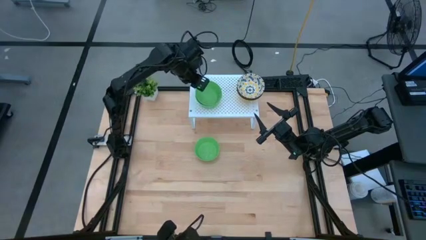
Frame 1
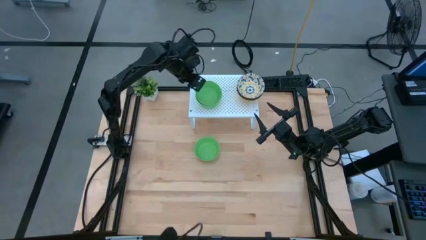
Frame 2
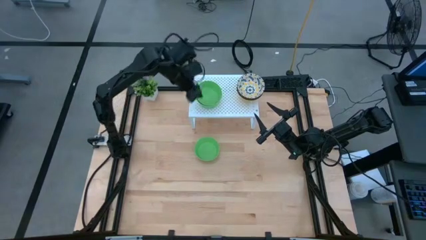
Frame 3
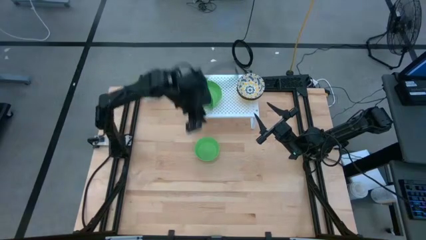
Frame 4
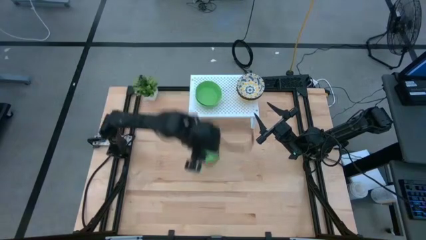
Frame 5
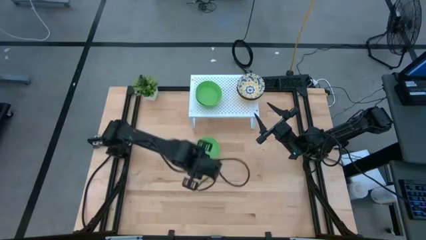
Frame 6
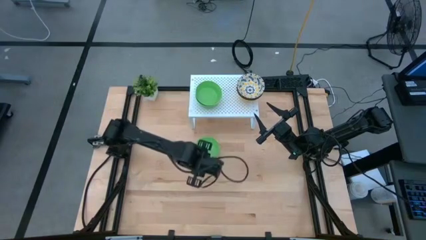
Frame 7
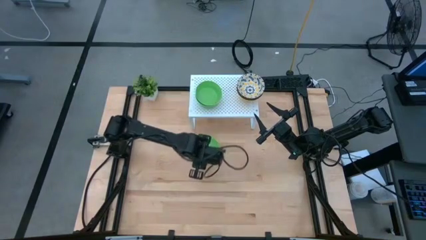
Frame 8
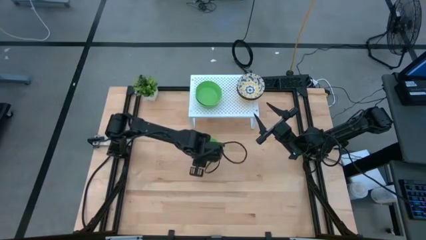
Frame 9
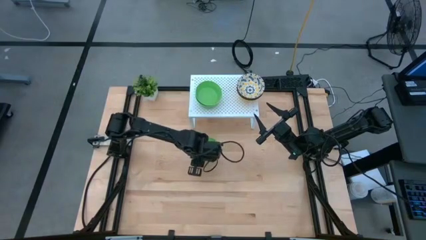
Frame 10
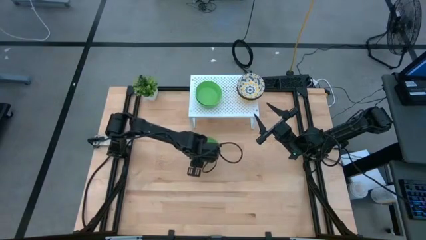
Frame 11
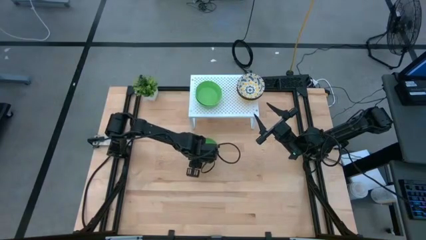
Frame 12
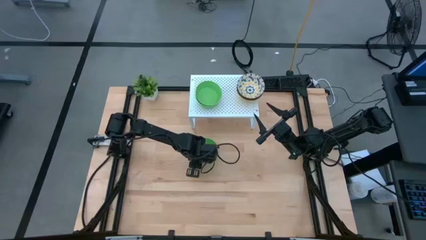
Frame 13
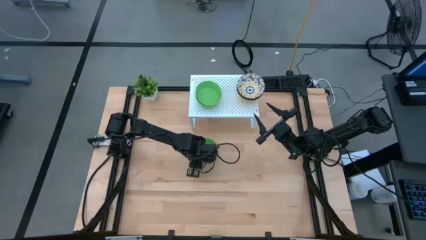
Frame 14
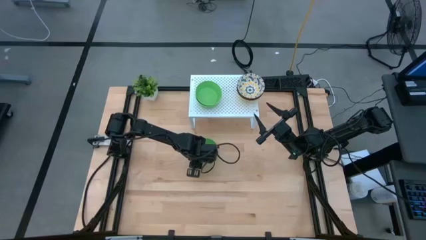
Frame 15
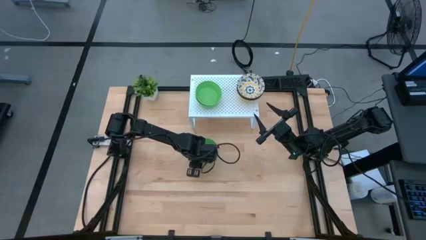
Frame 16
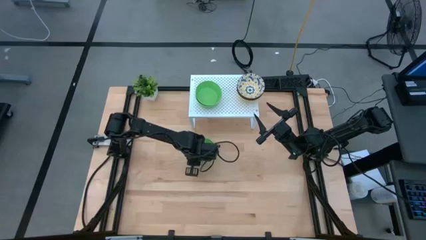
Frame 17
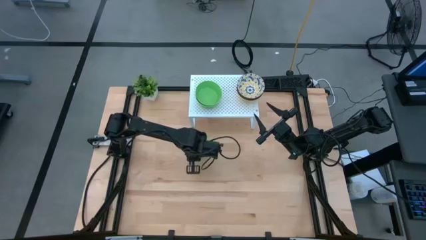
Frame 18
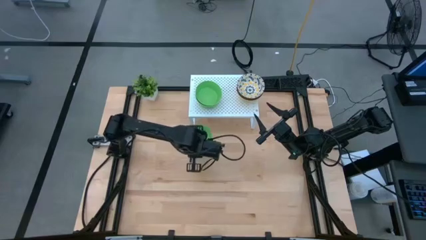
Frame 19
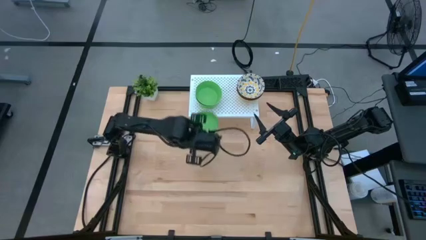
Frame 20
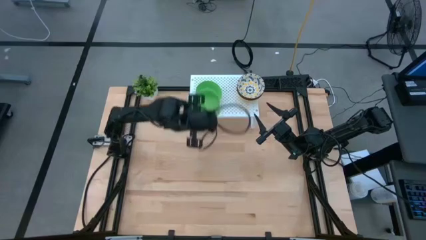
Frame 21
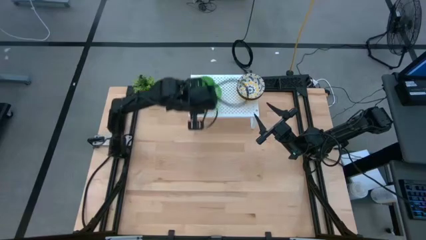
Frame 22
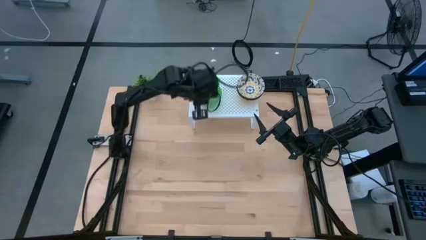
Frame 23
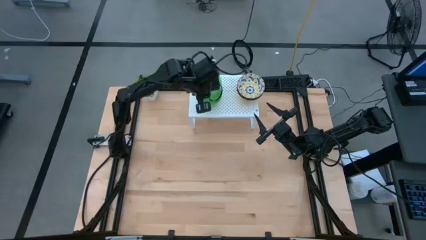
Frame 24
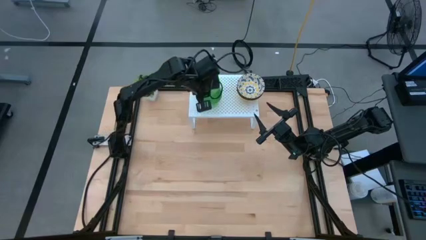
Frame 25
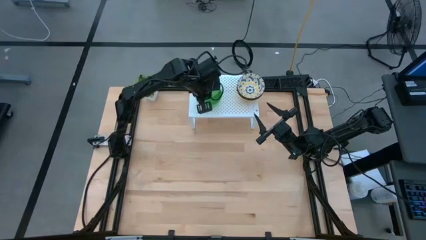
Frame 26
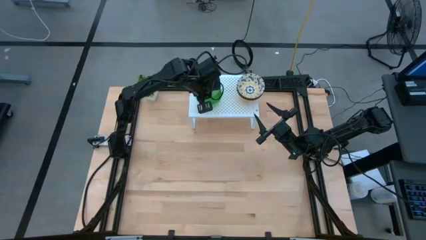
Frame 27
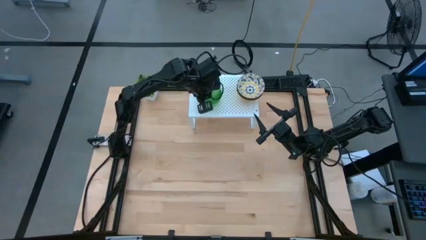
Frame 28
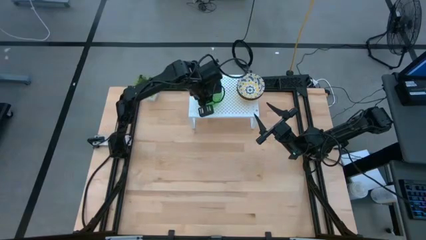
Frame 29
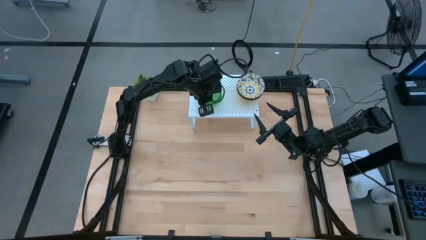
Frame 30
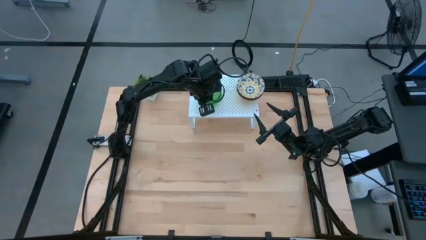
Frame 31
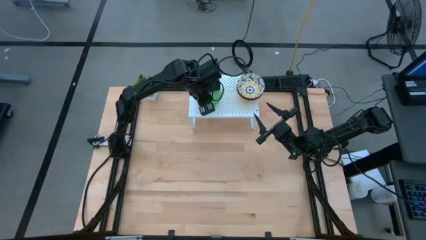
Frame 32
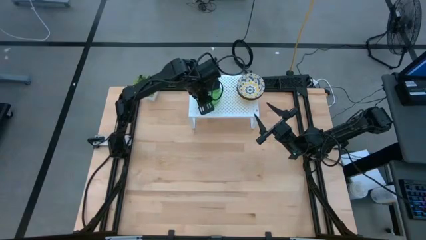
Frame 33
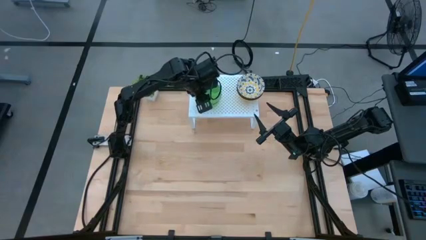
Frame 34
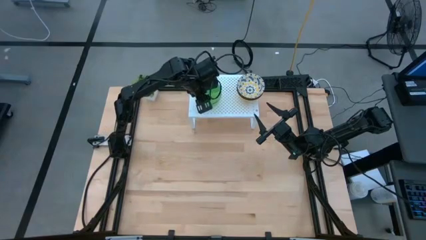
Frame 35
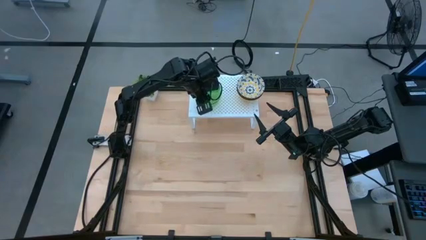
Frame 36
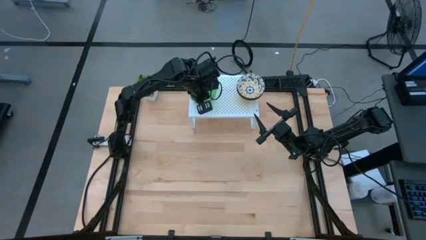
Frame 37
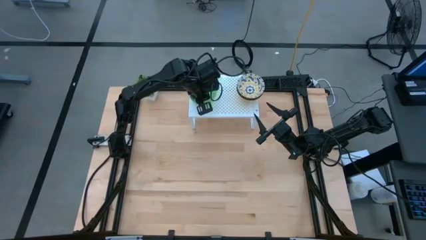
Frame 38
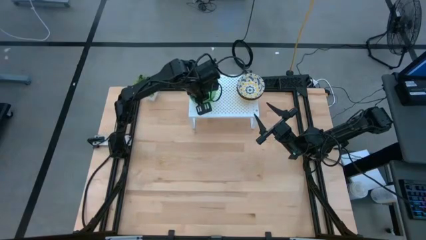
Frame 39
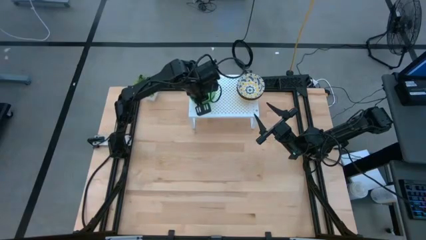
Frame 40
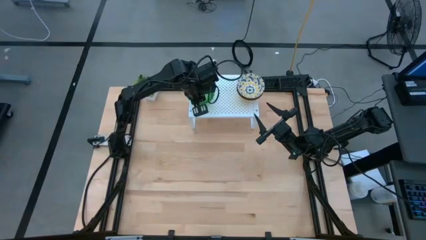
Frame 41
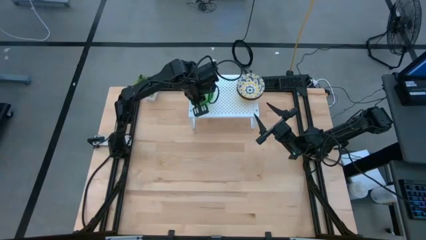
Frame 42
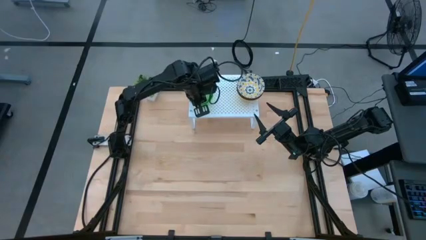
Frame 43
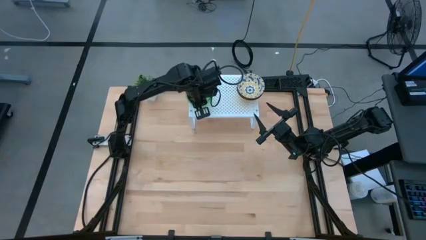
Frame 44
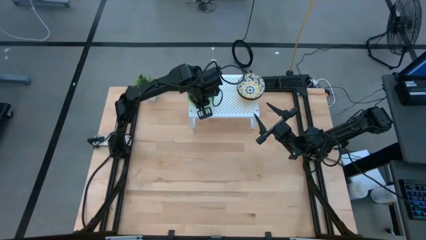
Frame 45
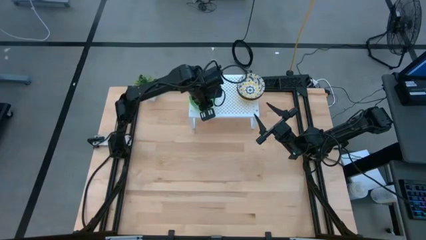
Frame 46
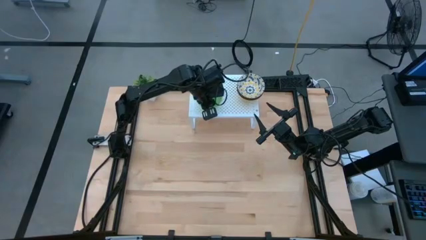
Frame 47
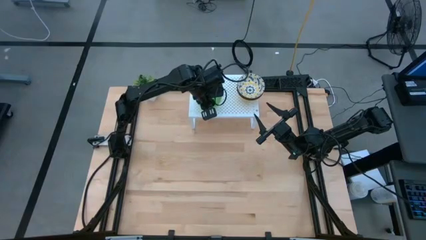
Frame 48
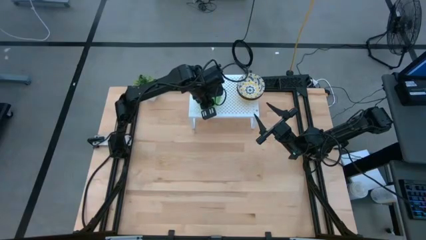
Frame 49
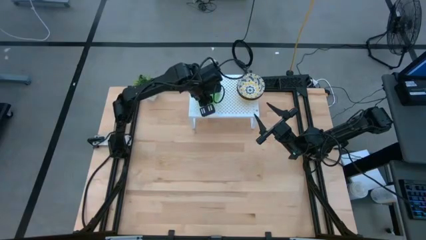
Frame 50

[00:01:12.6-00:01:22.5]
Task: Pick & Place Mini bowls
Stack the green bowl on top of the green bowls on the shelf

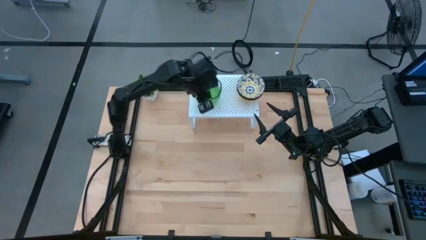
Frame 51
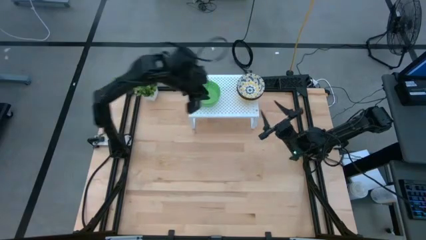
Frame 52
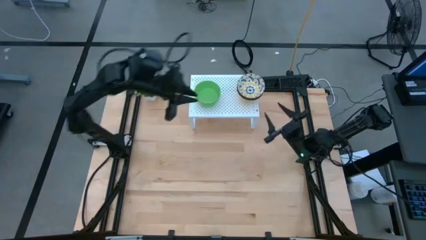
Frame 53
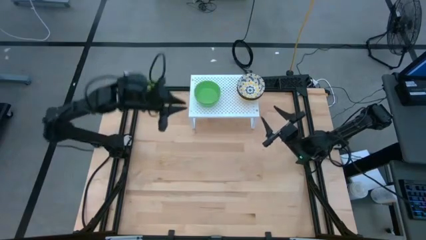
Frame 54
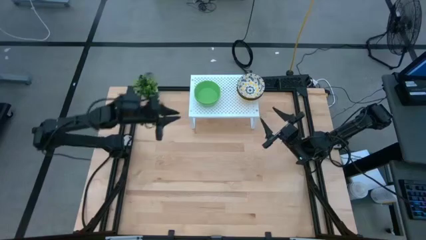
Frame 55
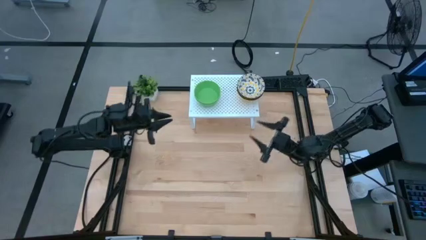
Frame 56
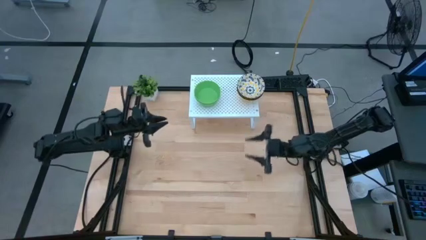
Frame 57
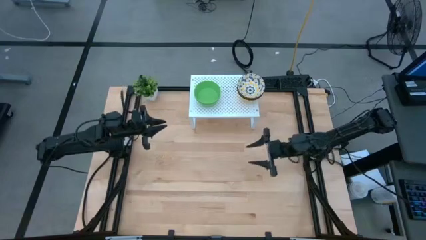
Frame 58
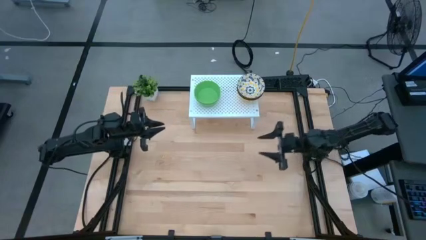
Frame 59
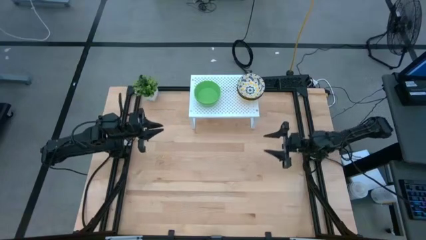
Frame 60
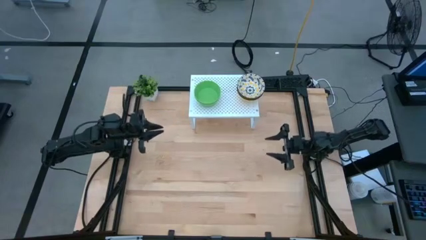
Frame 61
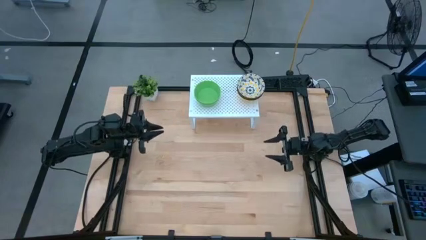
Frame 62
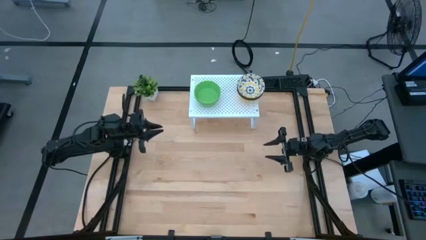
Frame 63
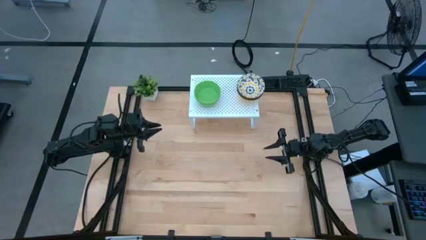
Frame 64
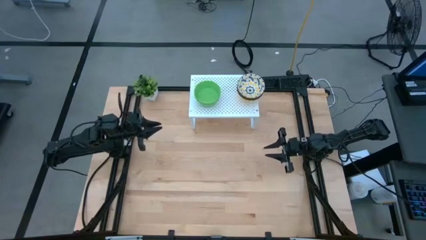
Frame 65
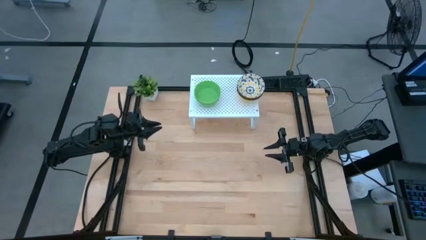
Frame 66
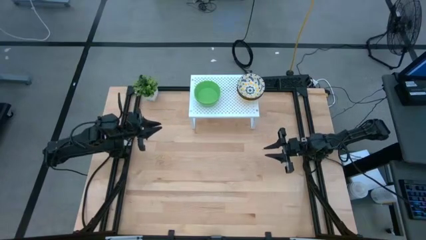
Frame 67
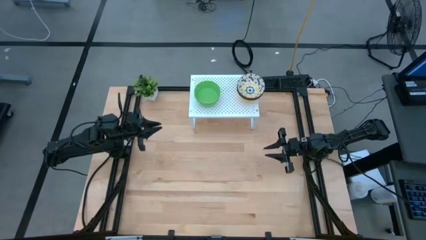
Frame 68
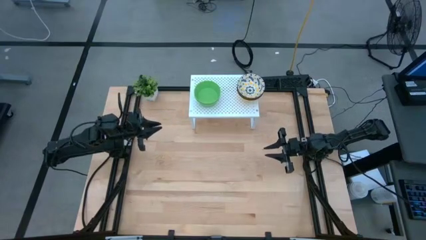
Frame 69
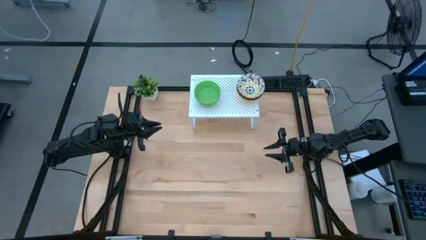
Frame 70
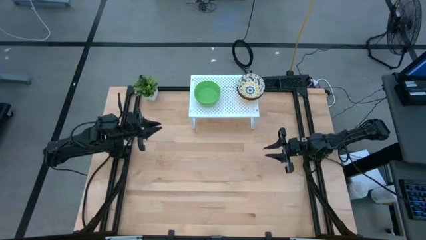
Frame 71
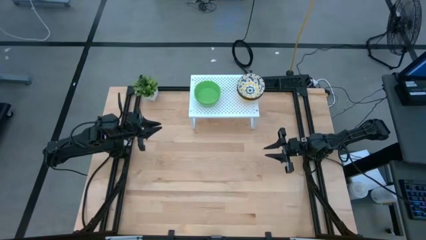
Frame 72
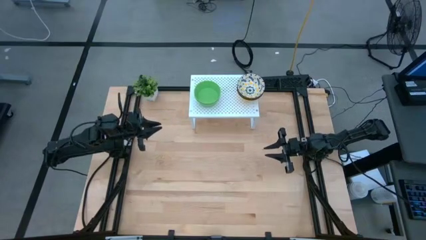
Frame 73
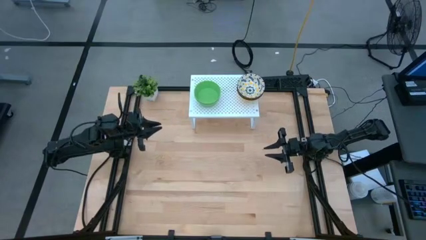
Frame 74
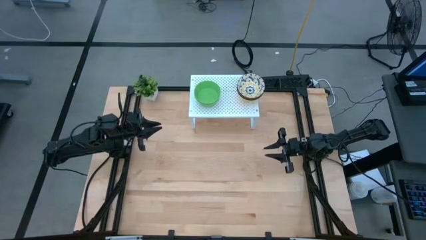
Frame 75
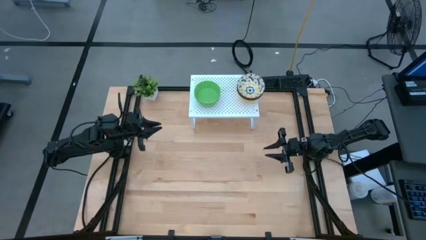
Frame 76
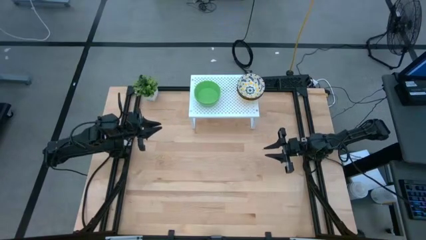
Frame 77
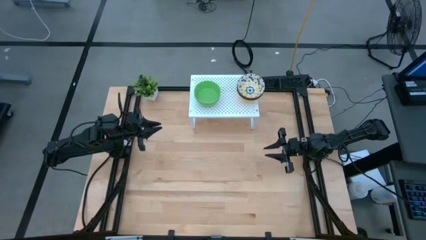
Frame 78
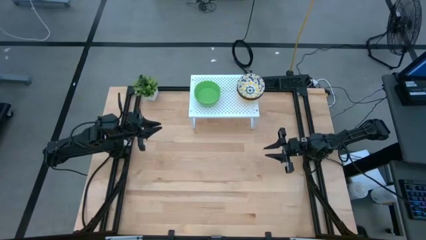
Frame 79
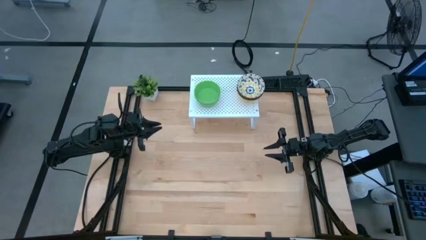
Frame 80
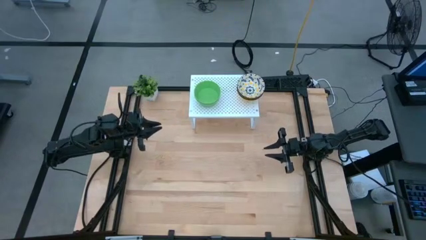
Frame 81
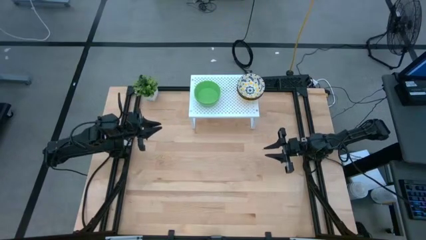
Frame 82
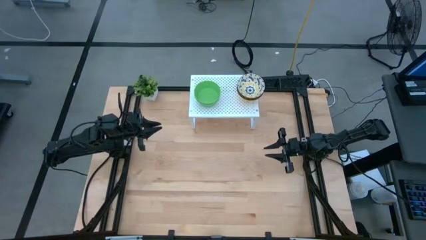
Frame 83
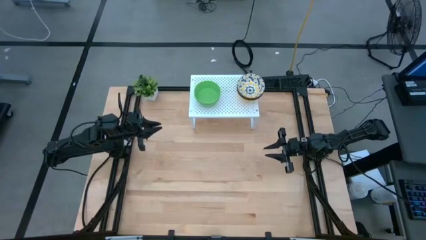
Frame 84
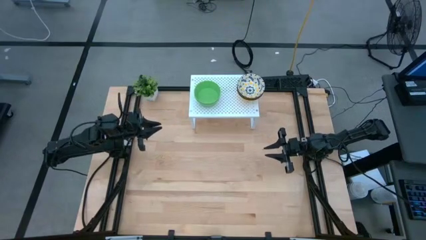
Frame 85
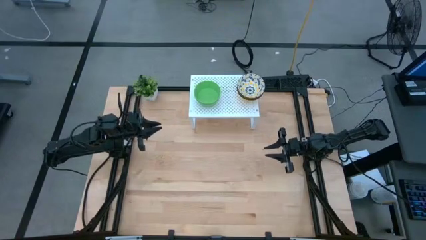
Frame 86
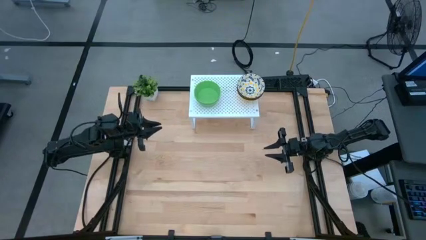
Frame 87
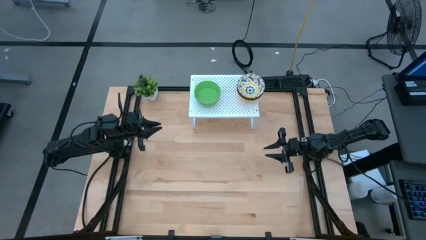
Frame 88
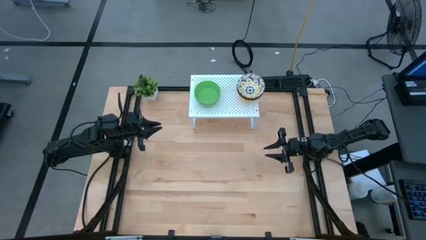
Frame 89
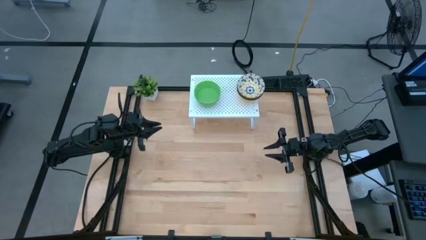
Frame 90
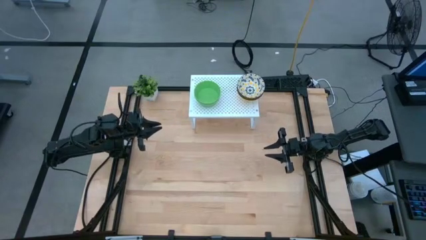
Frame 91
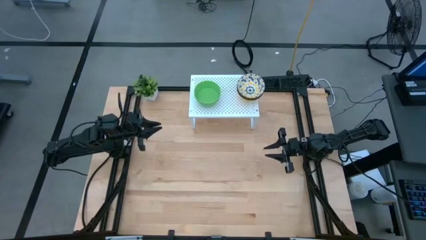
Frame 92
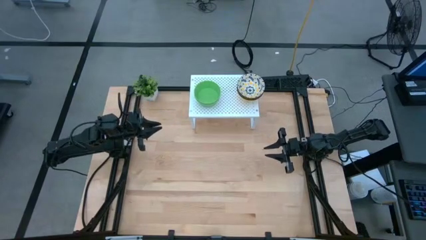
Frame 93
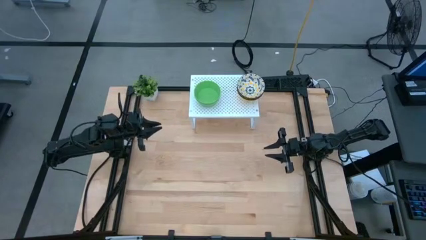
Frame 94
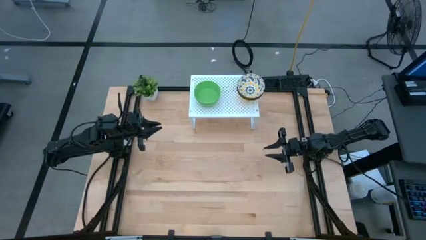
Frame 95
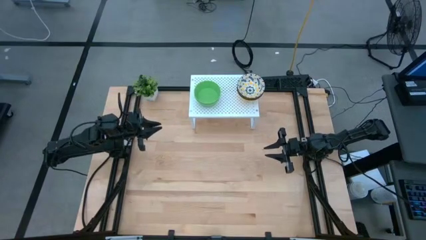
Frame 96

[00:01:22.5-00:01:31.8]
Return to Home Position
